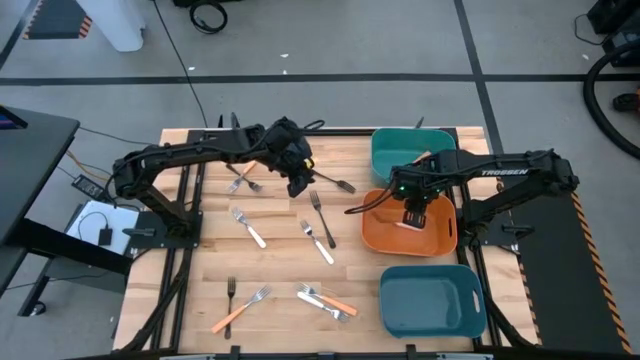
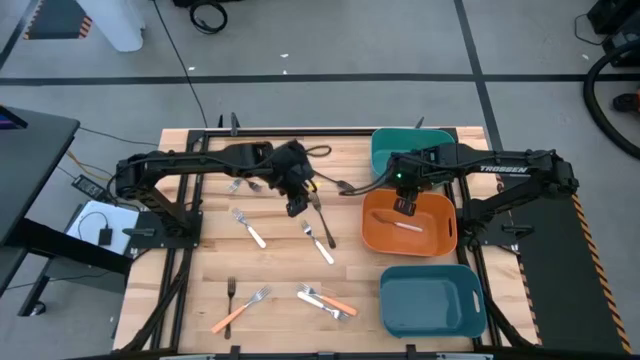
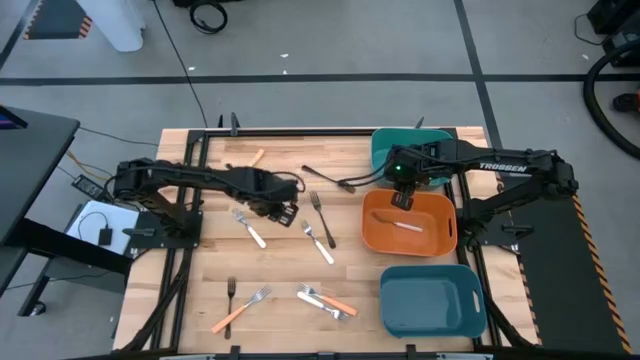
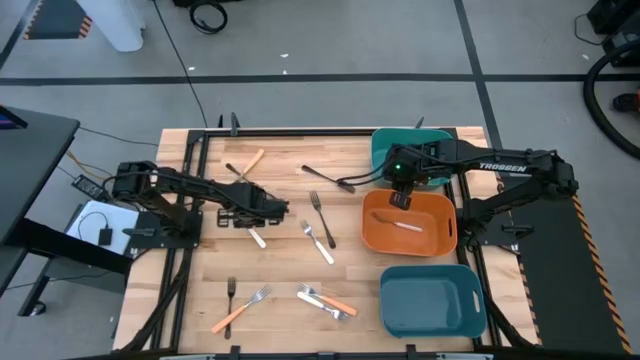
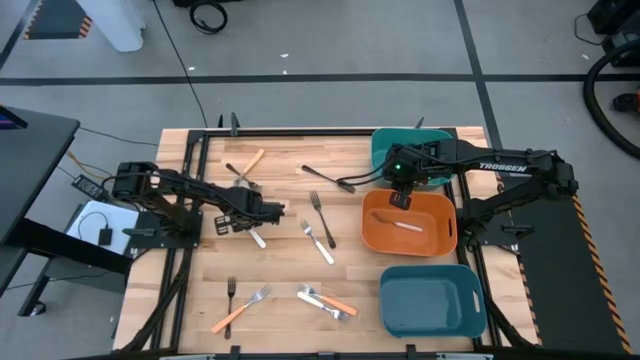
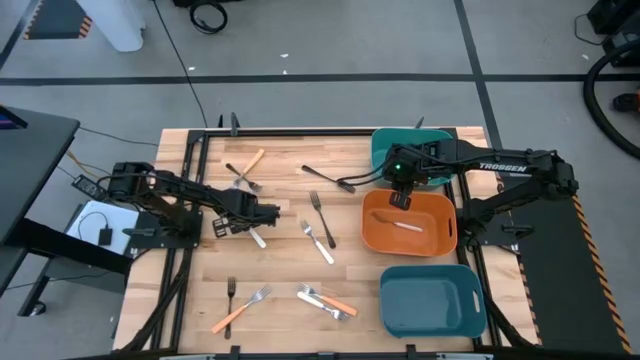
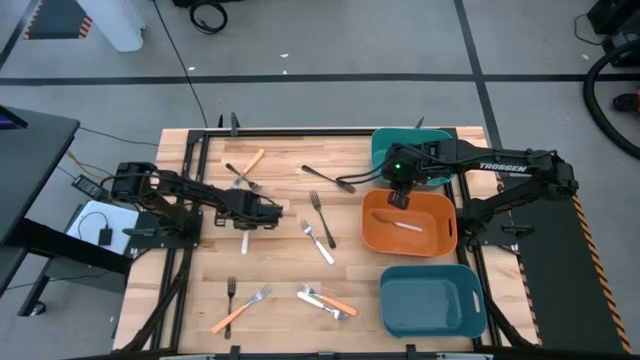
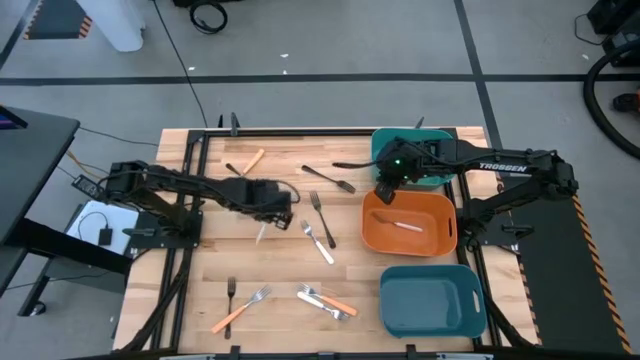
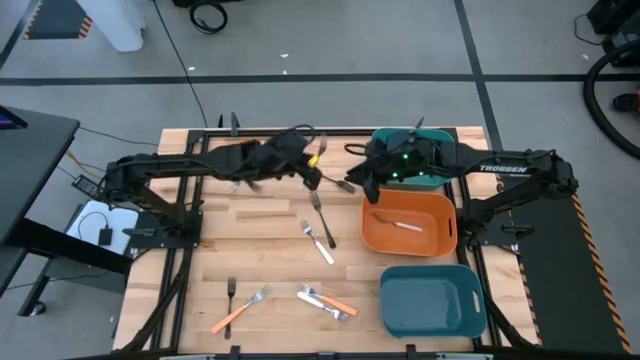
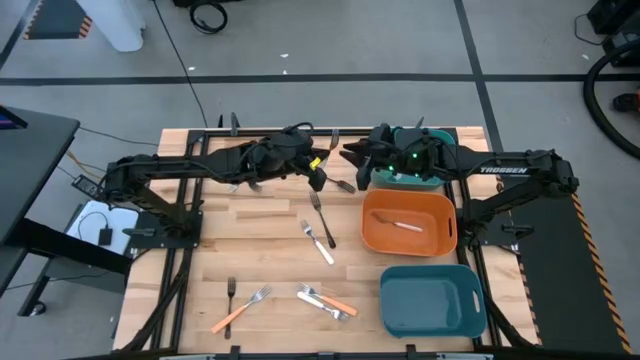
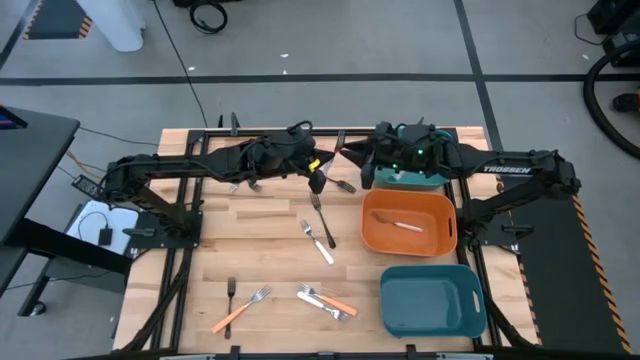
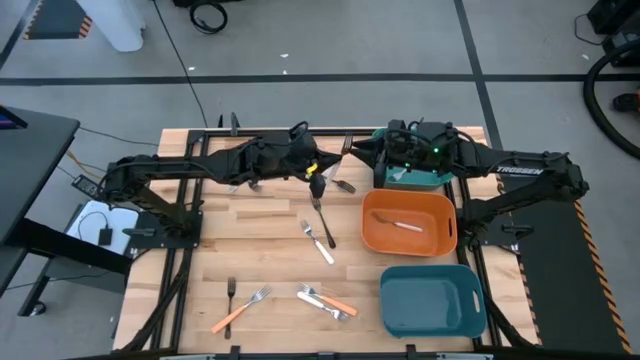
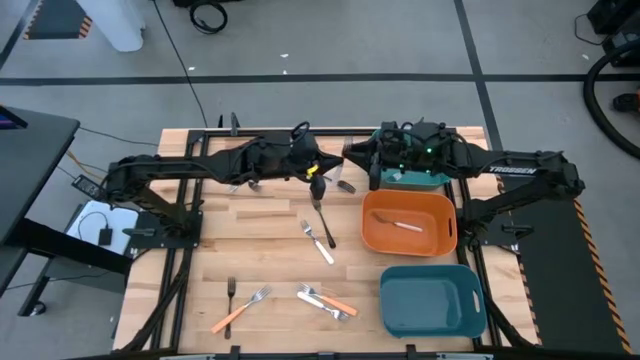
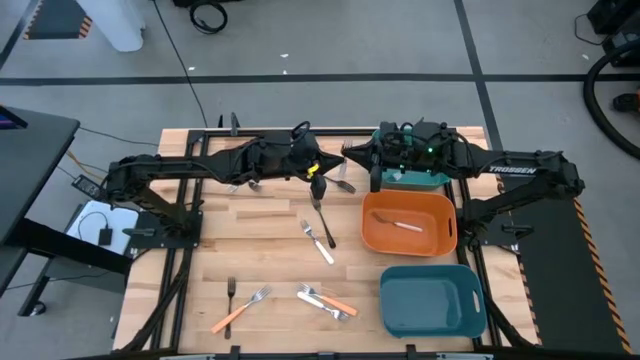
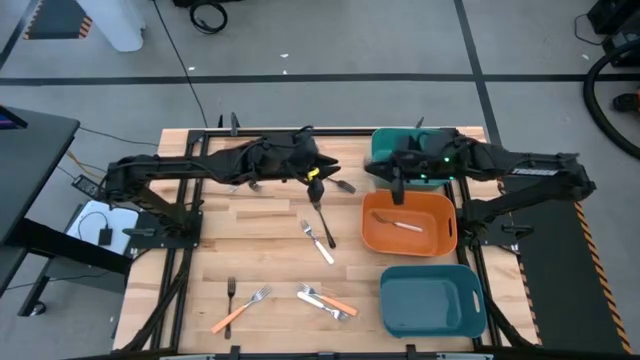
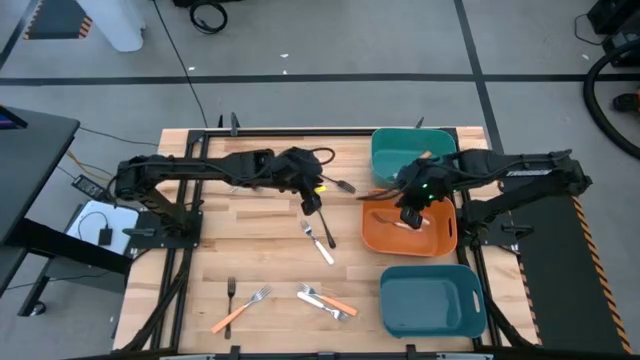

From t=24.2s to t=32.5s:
Task: Sort silverware by color (type)
Put the white fork into the orange bin

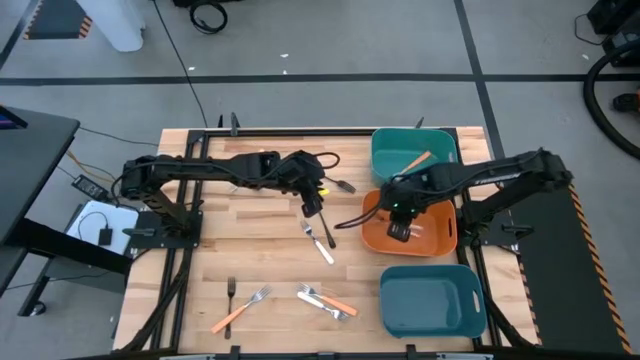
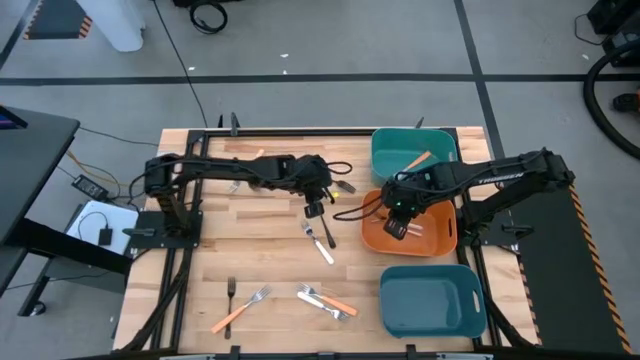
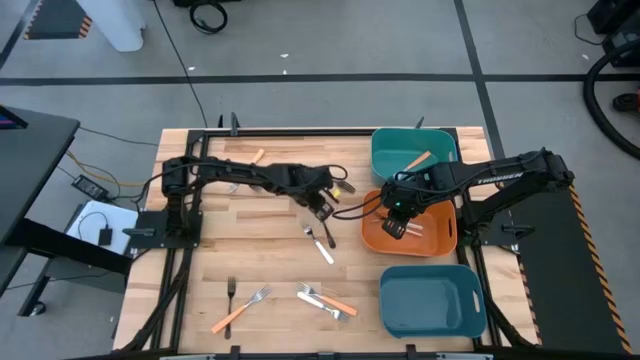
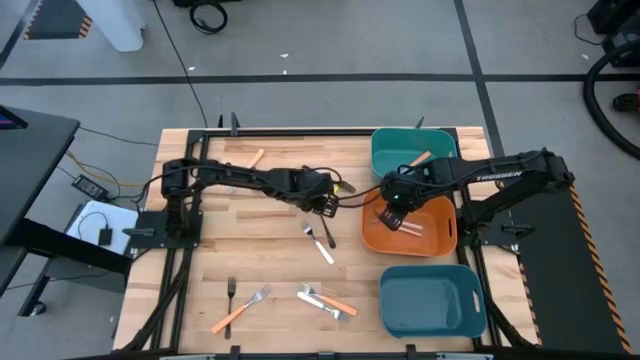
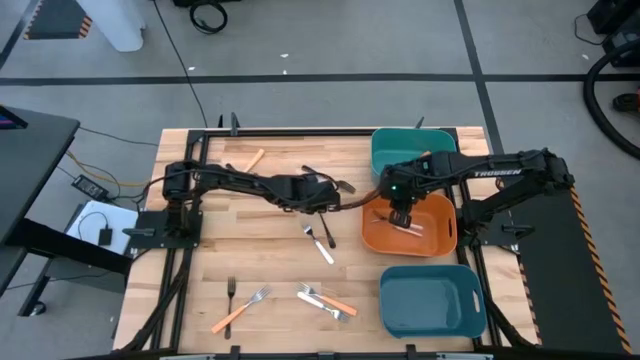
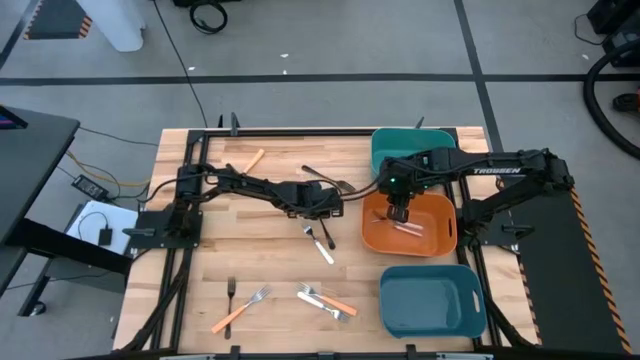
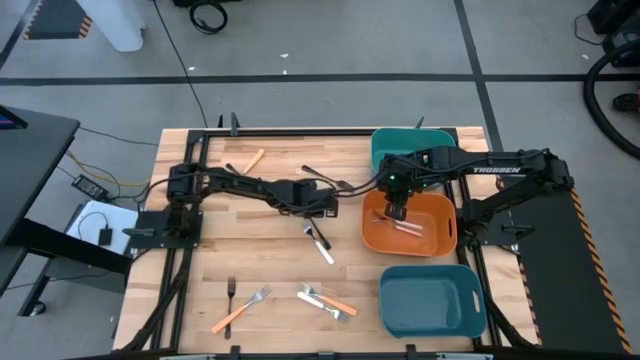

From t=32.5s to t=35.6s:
Adjust the black fork

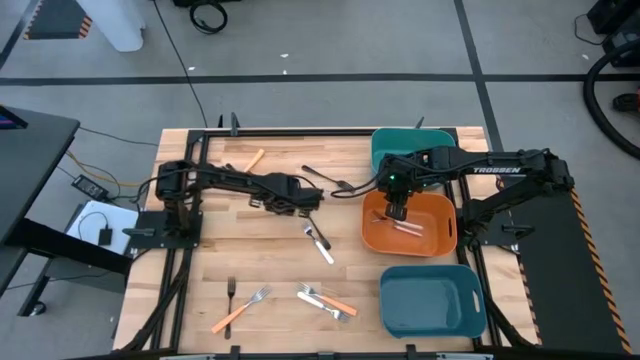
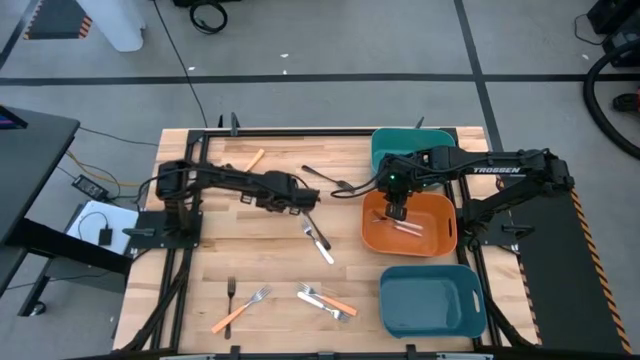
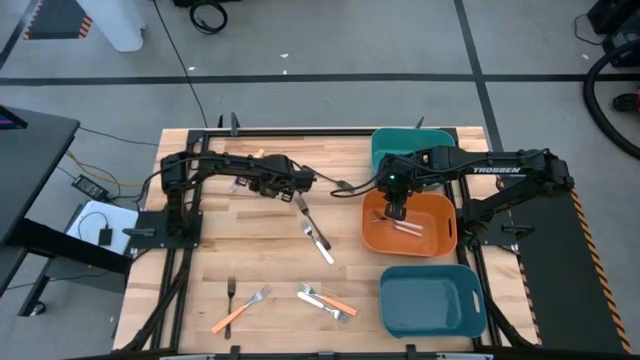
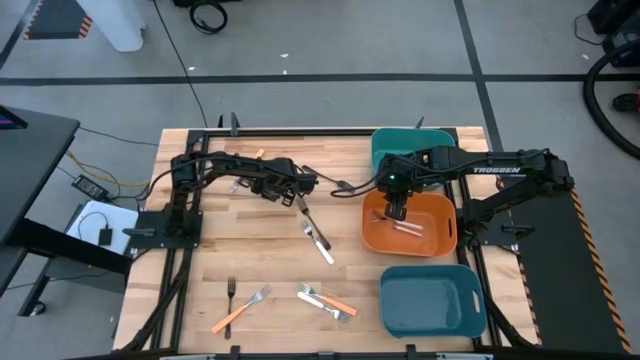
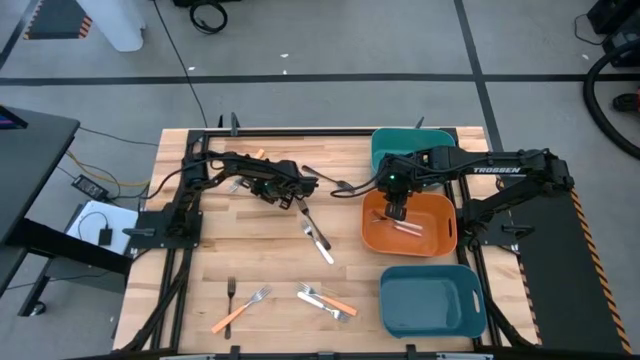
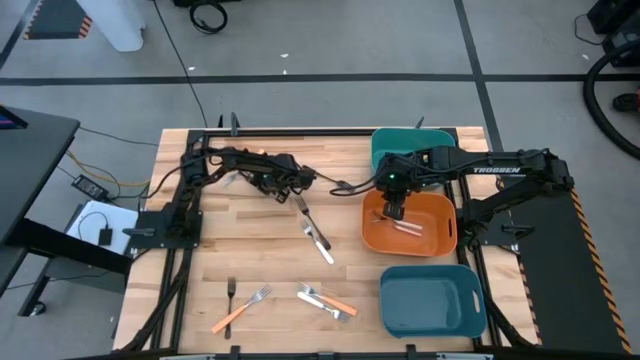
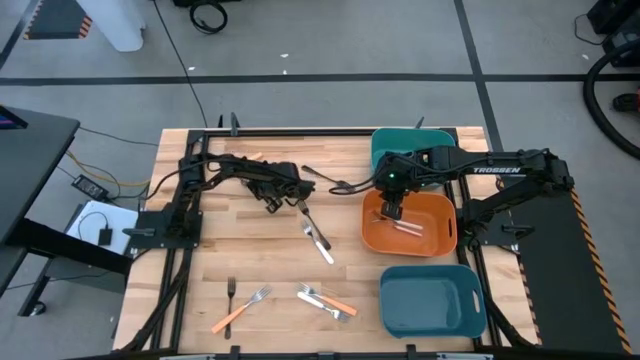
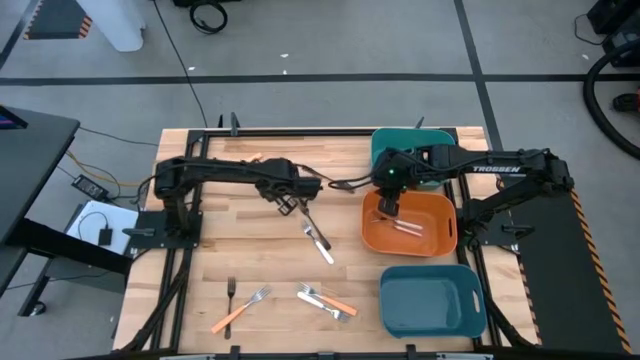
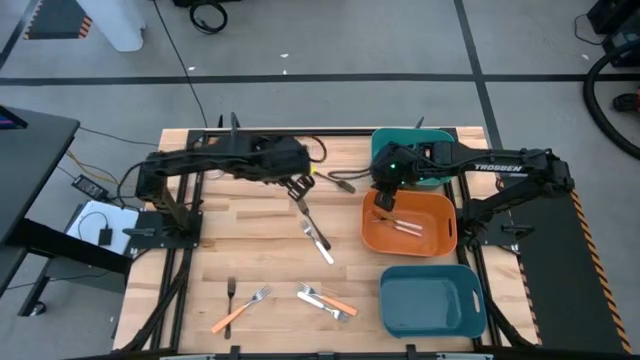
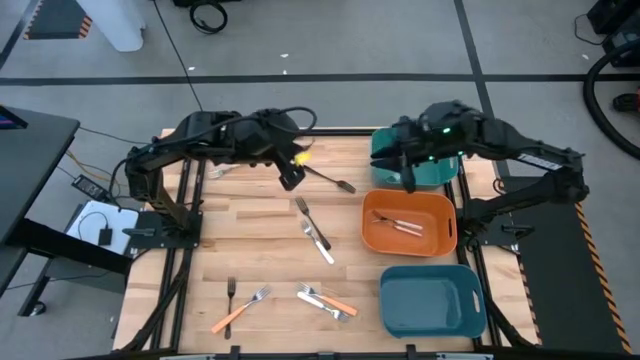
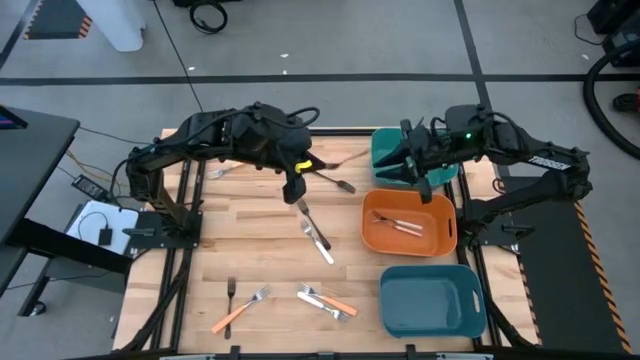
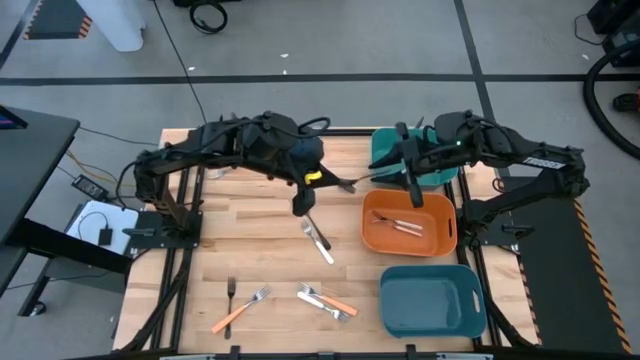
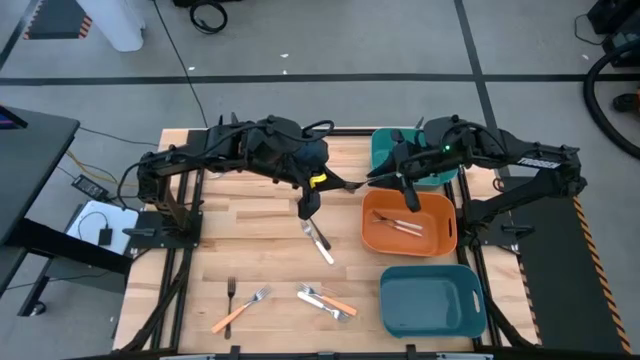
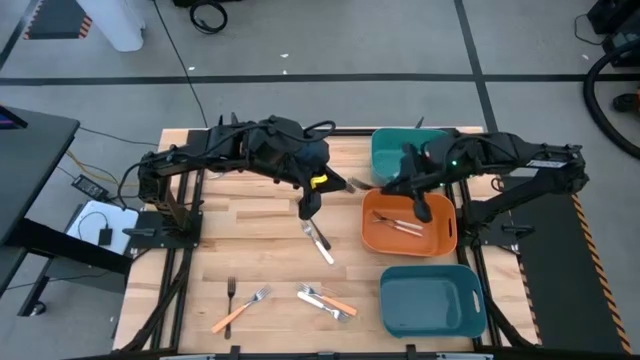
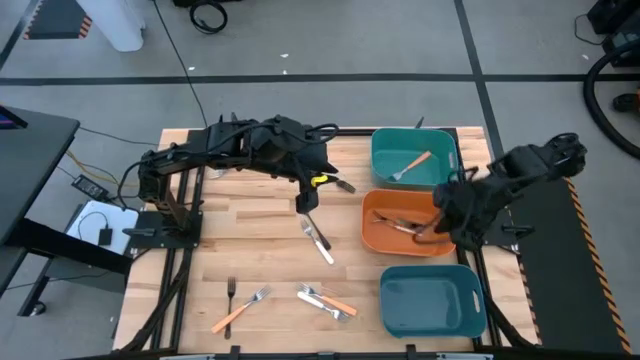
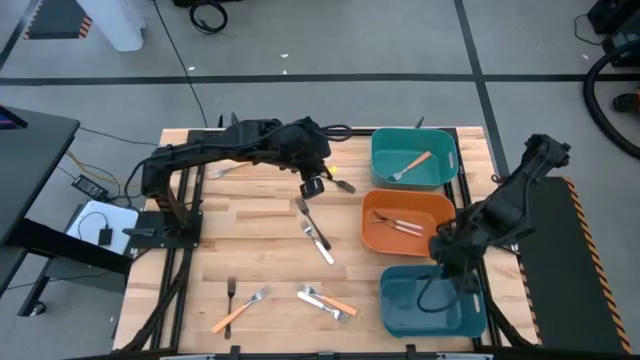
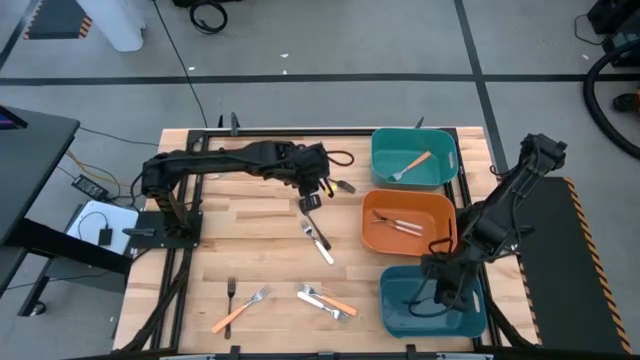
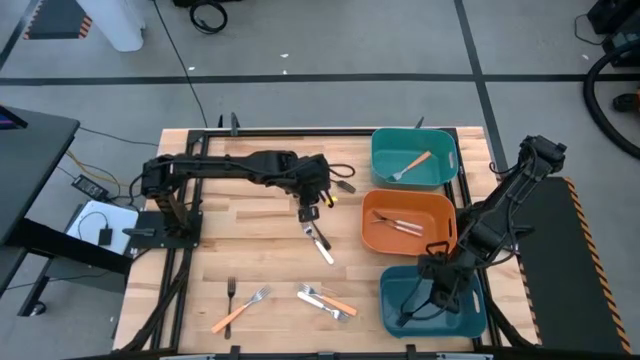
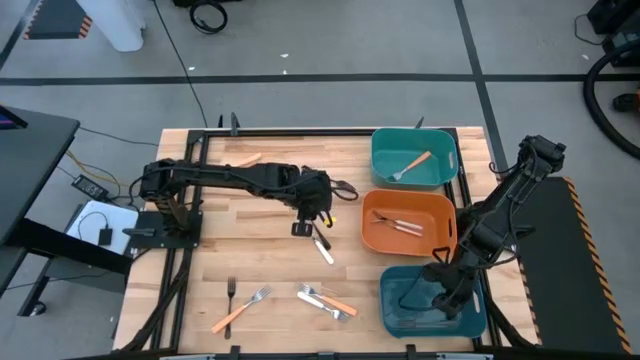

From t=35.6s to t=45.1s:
Put the black fork into the blue bin
